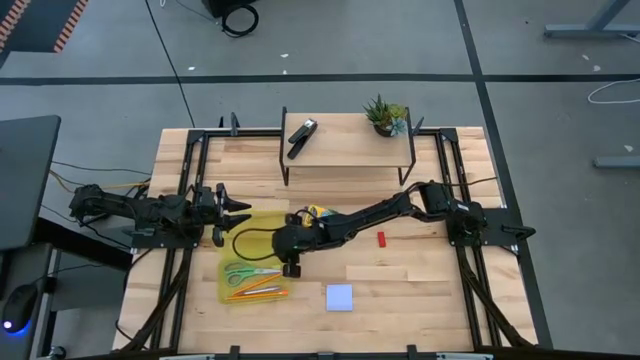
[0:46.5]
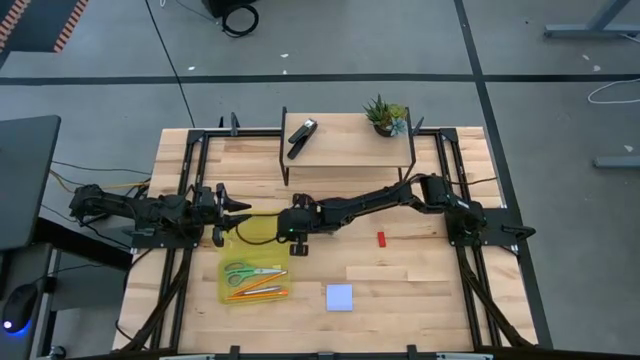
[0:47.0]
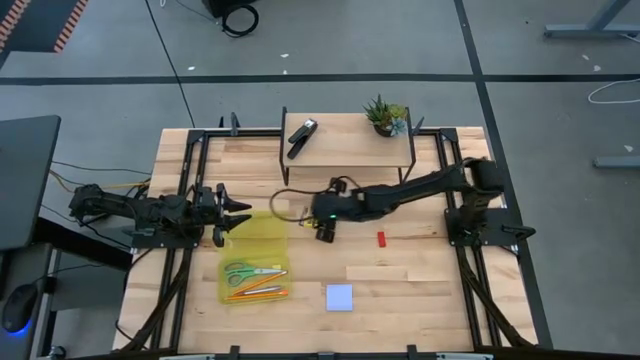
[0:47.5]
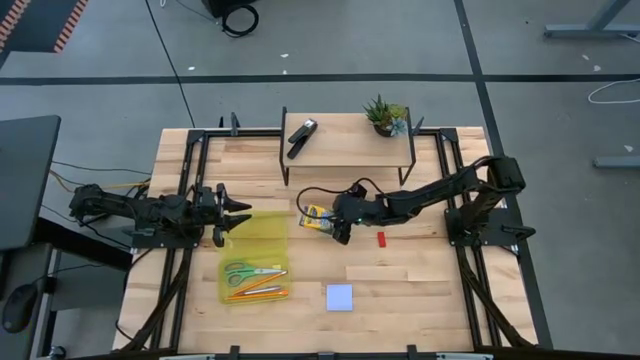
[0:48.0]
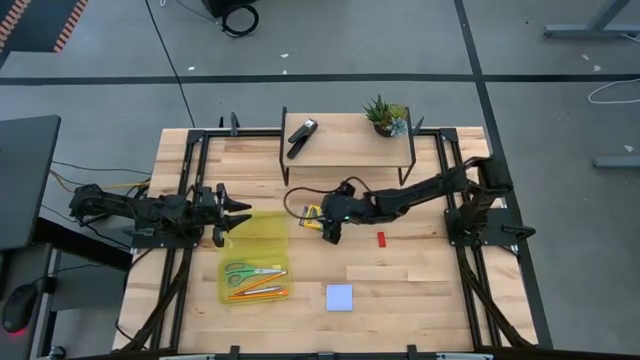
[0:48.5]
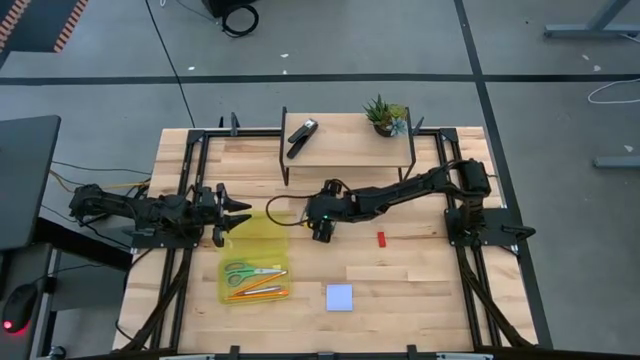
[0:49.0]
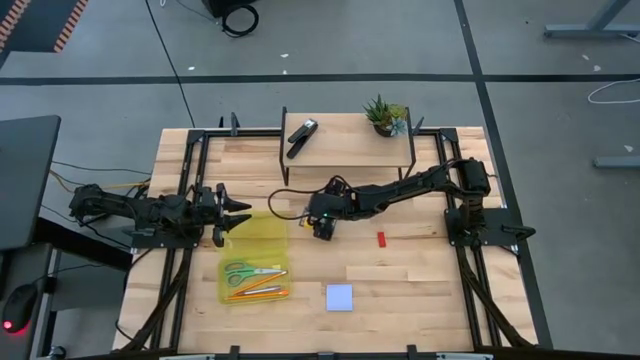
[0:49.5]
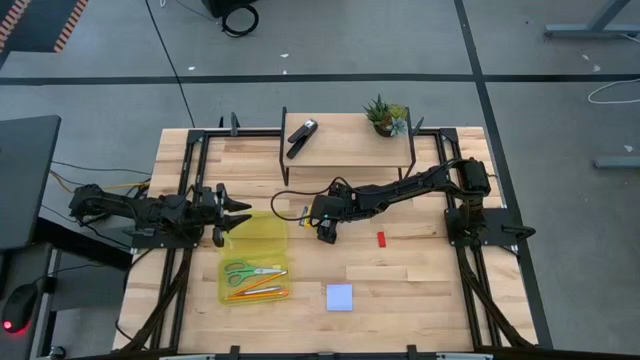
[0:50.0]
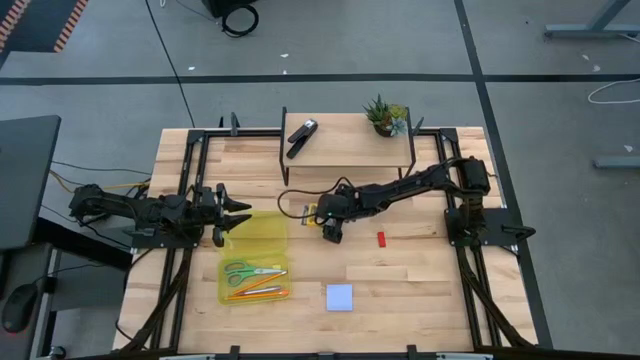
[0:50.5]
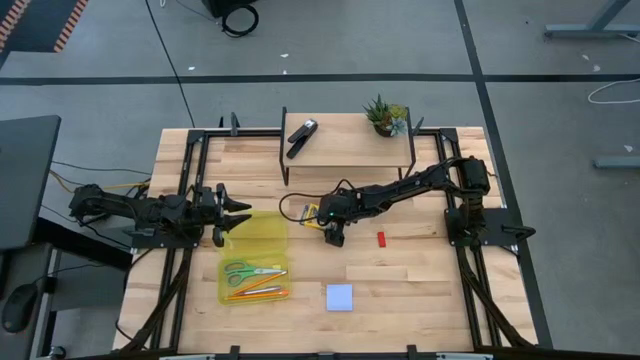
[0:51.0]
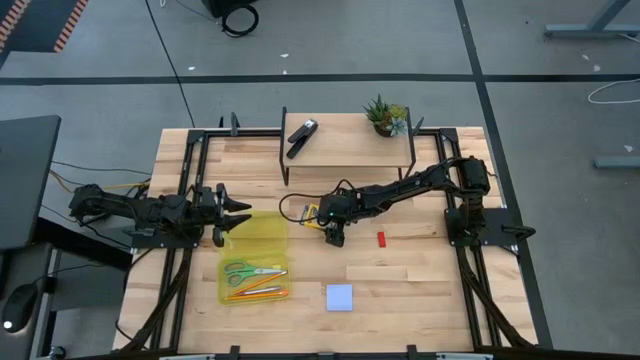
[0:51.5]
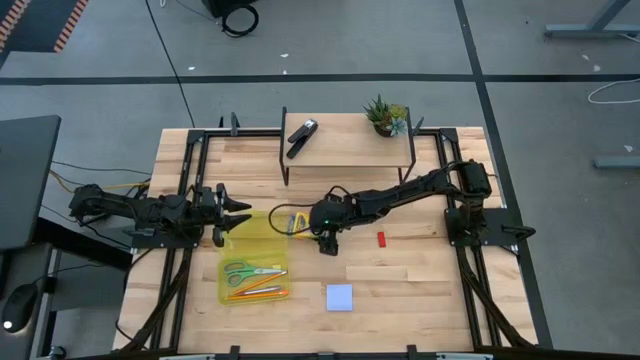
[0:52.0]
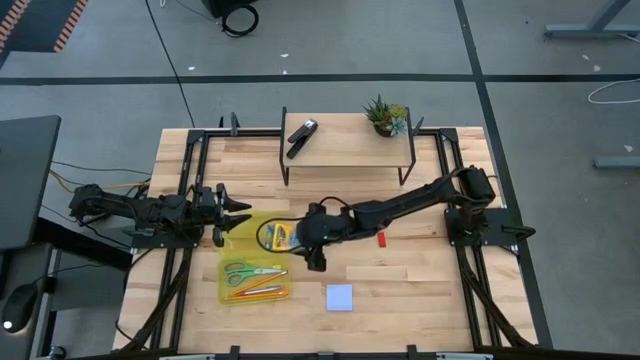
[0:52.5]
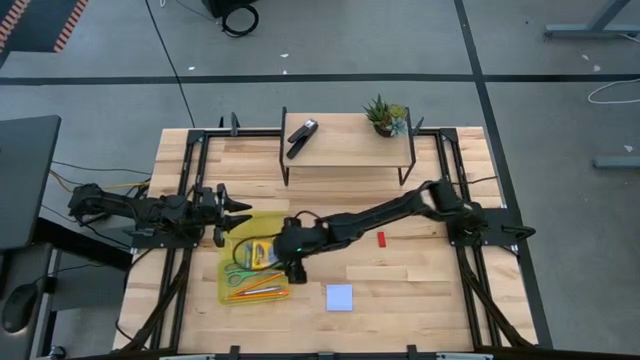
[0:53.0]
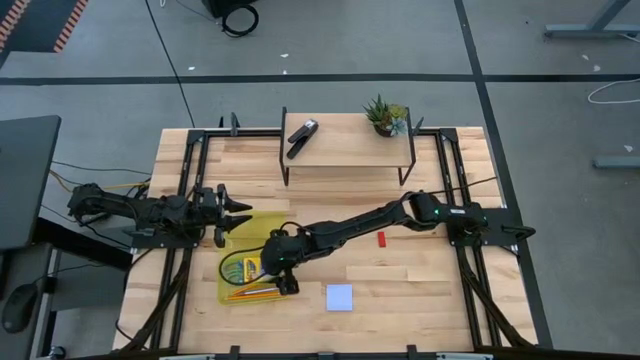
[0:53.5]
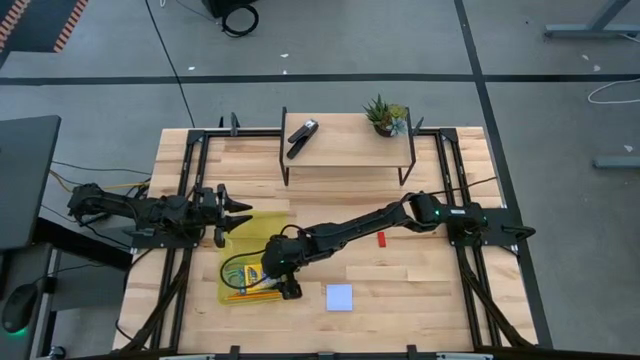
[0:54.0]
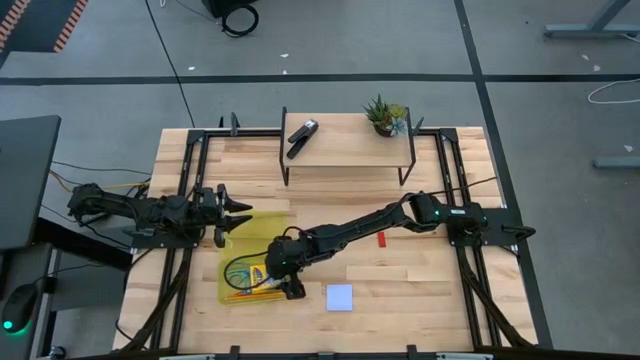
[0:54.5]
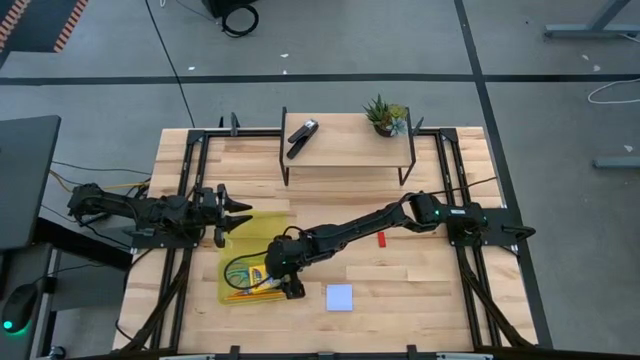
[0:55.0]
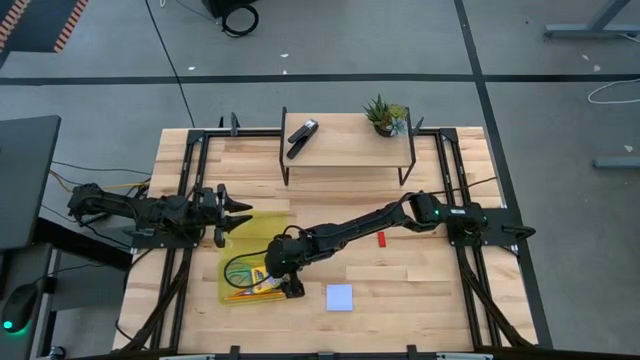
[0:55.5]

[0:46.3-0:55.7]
Task: Pack school essentials
Put the yellow crayon box into the yellow supply box

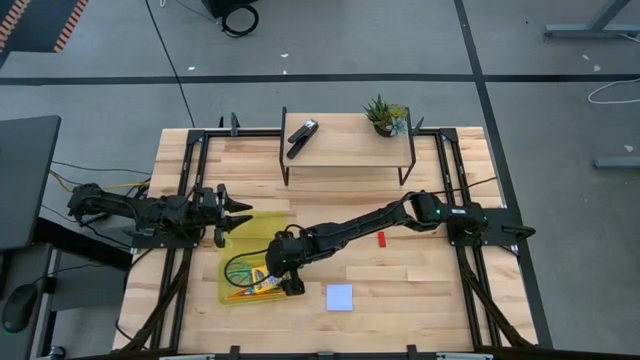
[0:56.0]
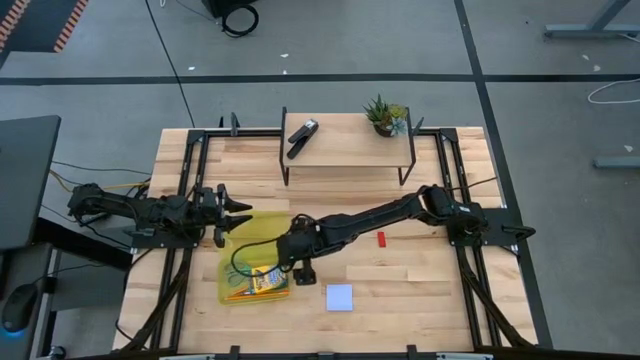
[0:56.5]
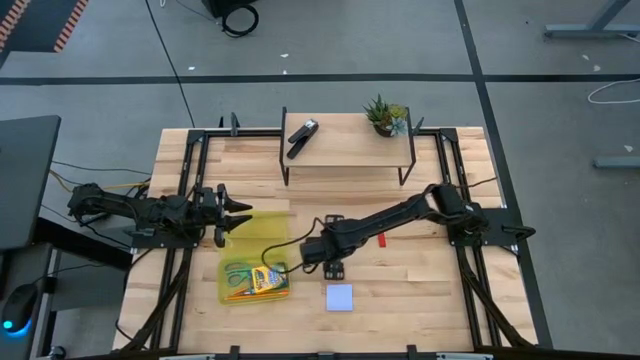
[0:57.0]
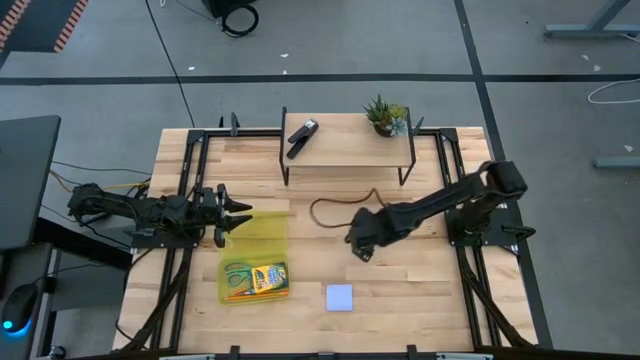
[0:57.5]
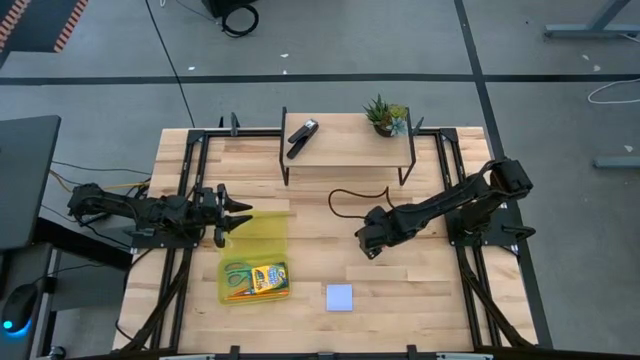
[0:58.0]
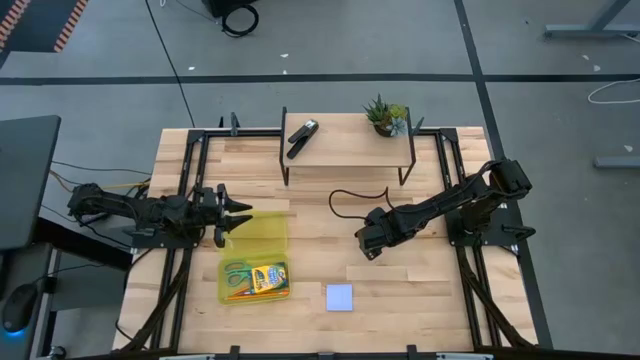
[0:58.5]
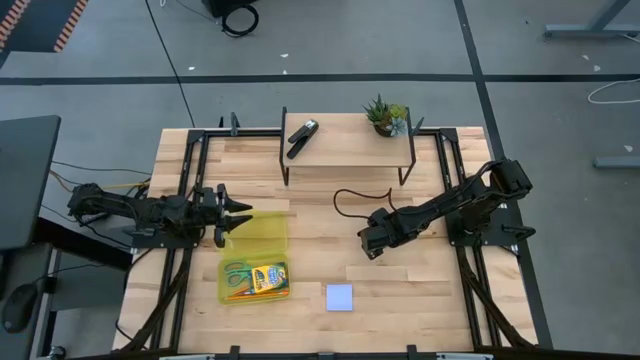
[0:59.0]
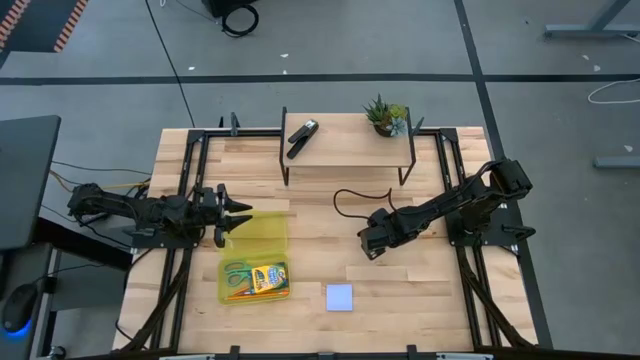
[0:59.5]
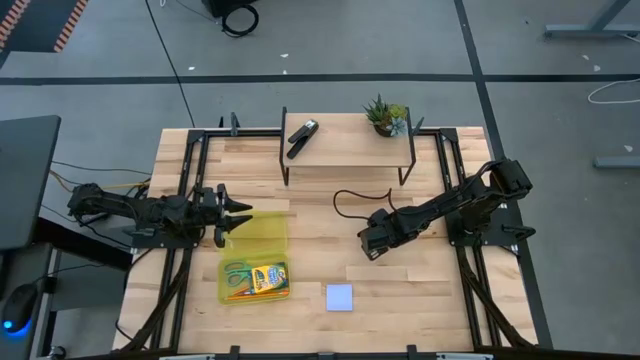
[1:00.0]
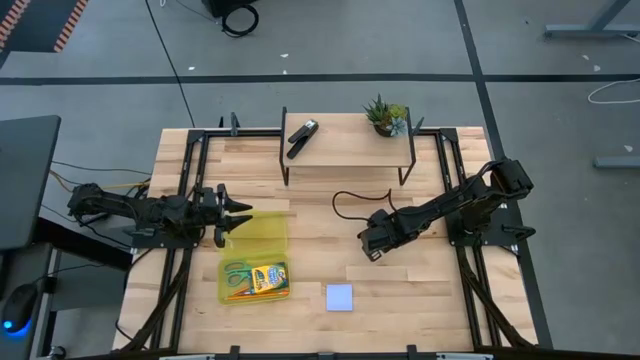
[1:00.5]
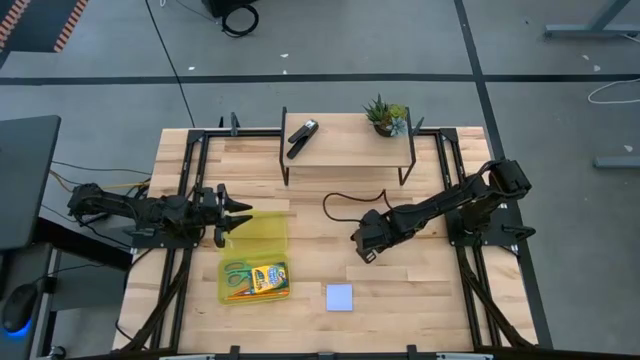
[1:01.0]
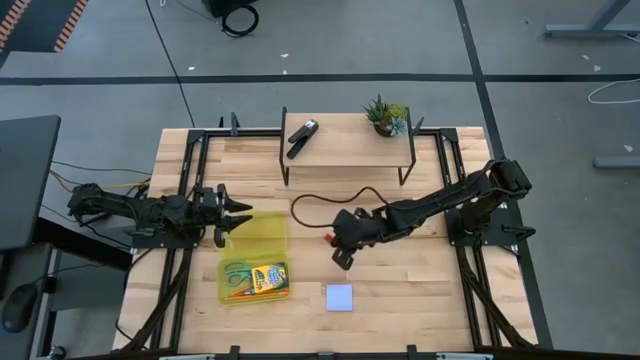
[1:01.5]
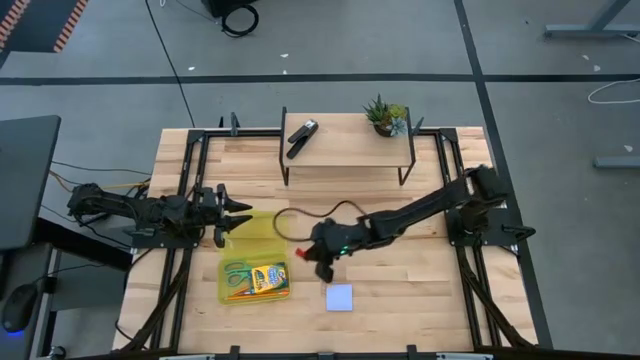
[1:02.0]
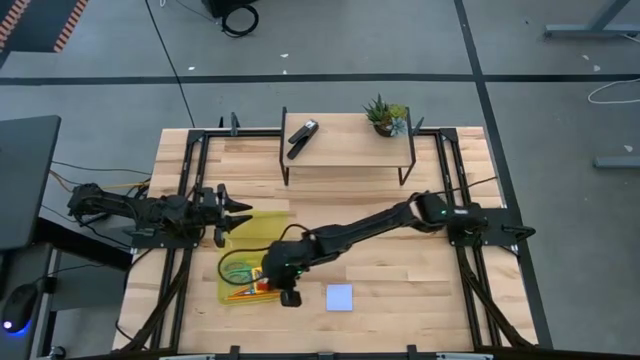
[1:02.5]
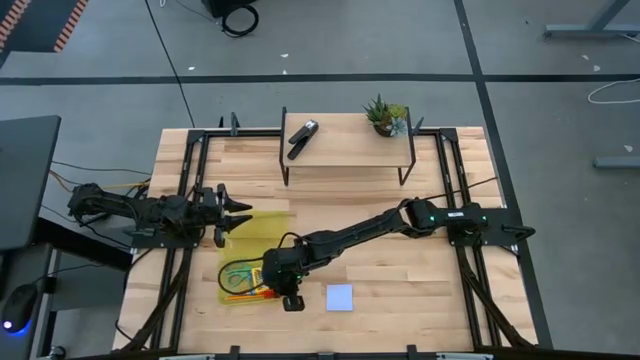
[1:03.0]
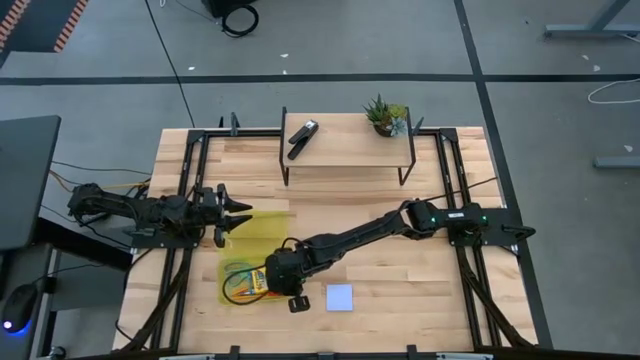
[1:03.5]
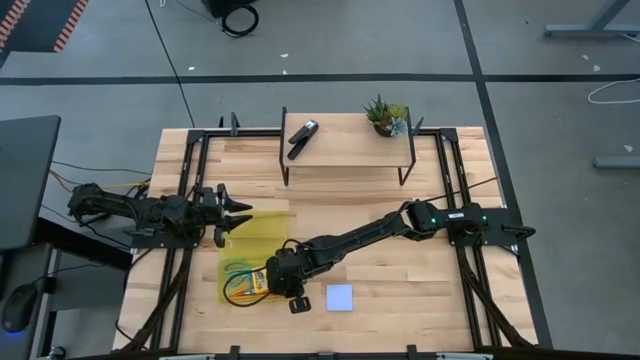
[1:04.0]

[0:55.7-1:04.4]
Put the red eraser into the yellow supply box

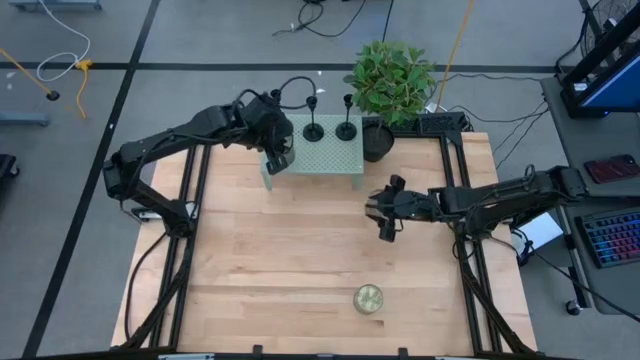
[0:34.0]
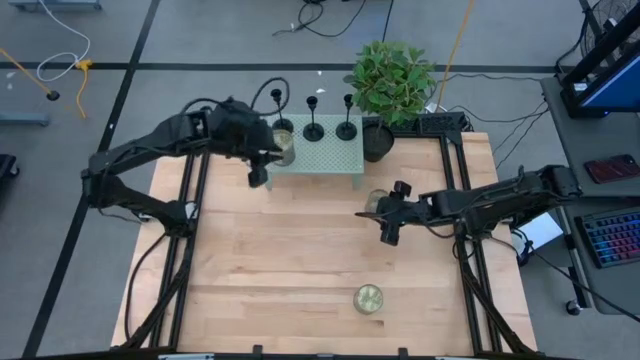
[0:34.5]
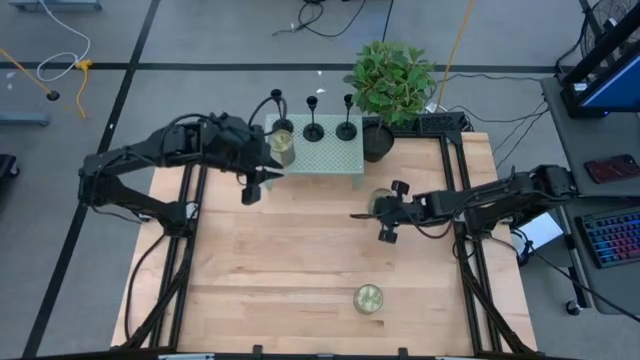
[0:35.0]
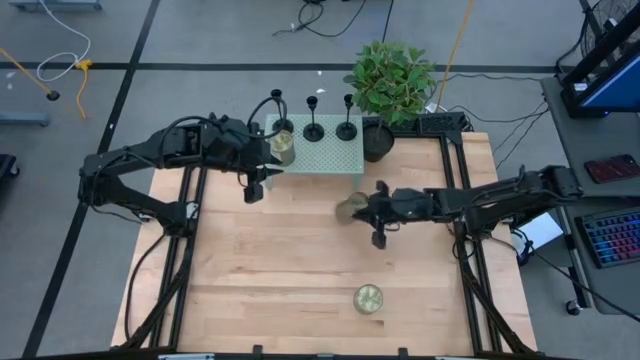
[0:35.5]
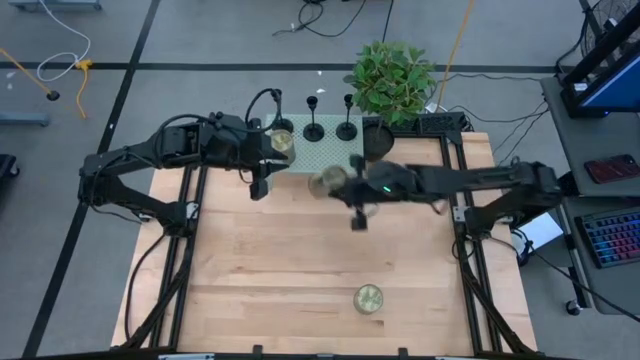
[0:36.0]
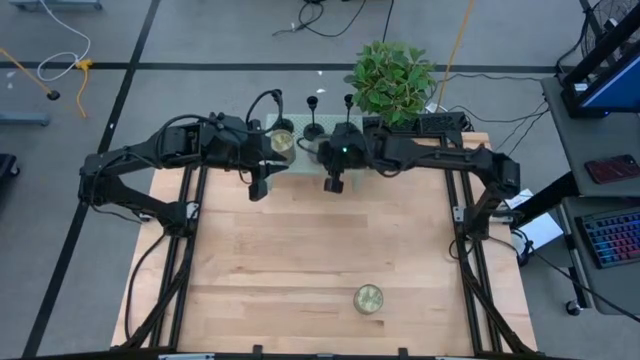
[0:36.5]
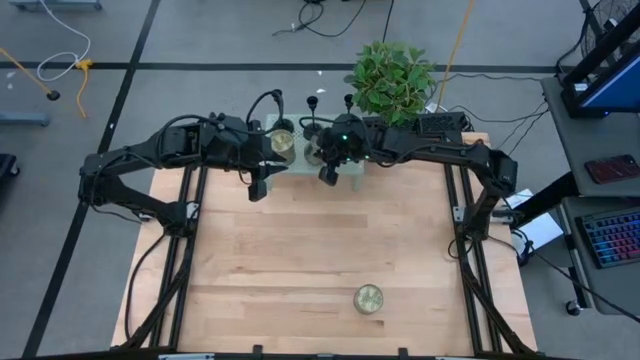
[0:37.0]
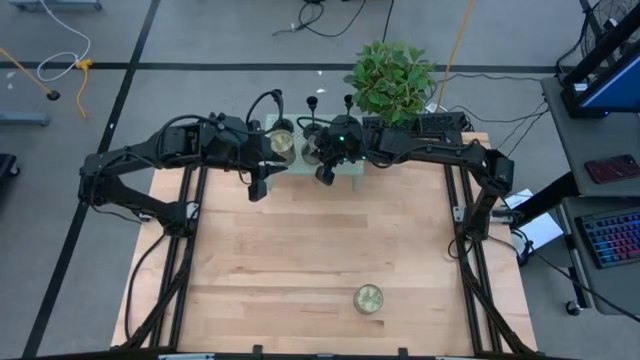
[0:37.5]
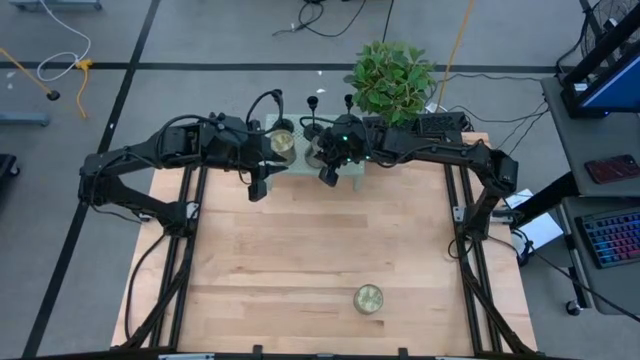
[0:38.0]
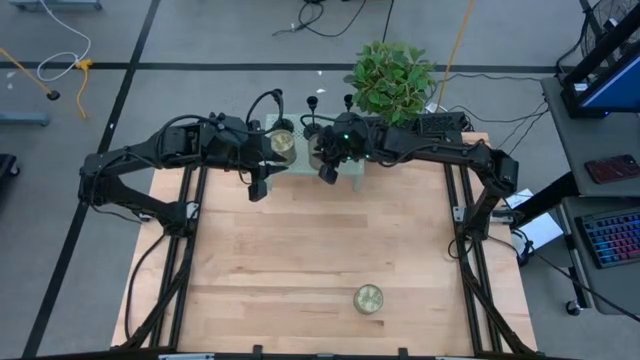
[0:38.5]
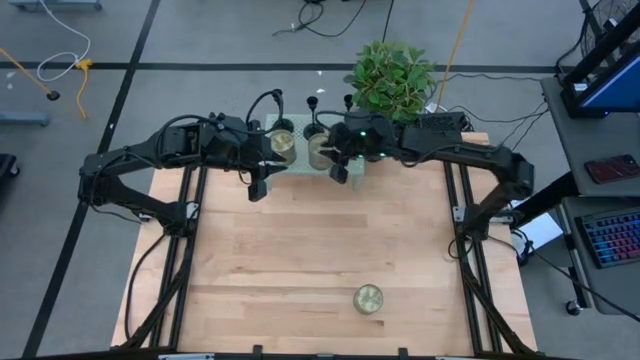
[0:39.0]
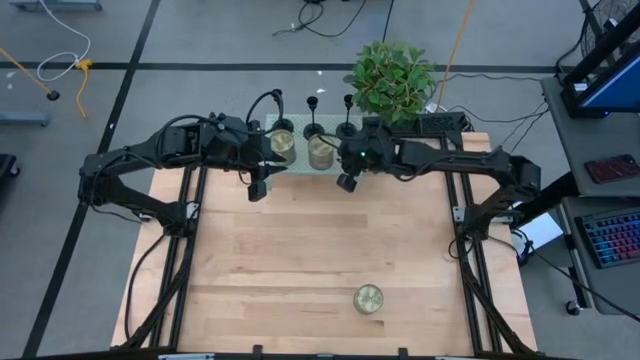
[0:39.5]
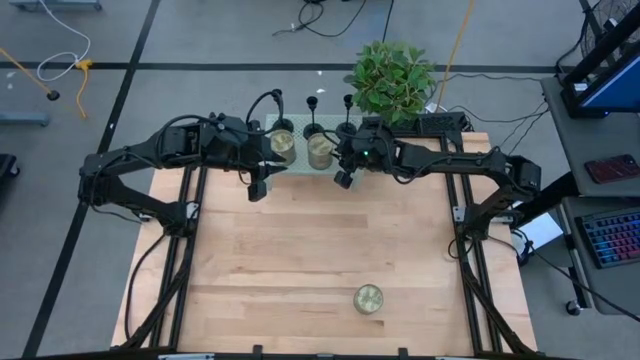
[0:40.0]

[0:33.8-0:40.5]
Task: Pick & Place candle stick holders
Put the top scented candle on the shelf aligned with the middle candle holder
